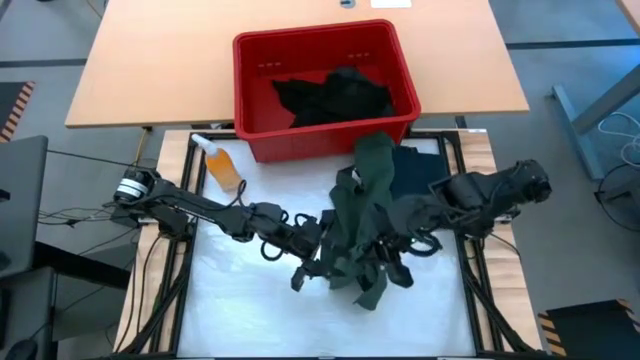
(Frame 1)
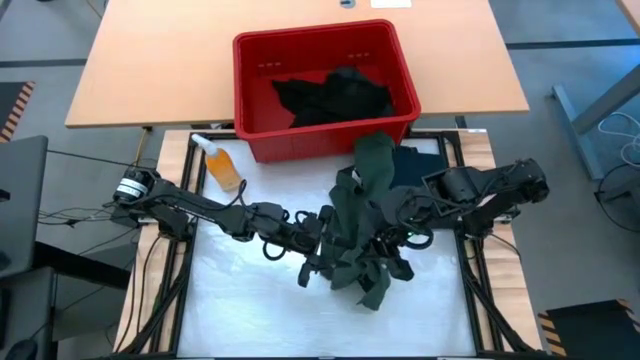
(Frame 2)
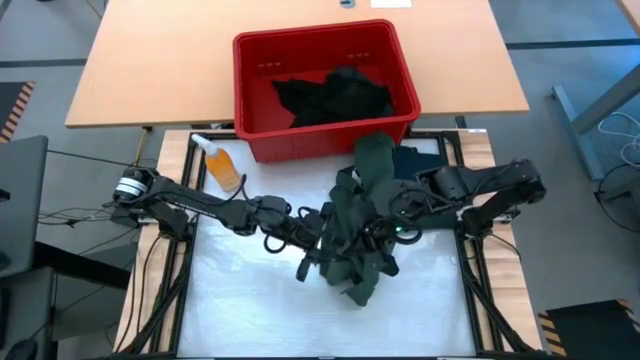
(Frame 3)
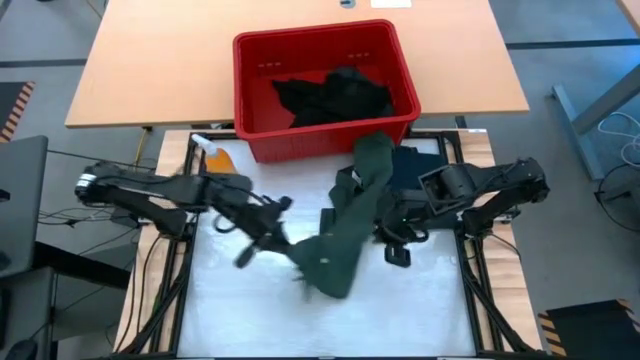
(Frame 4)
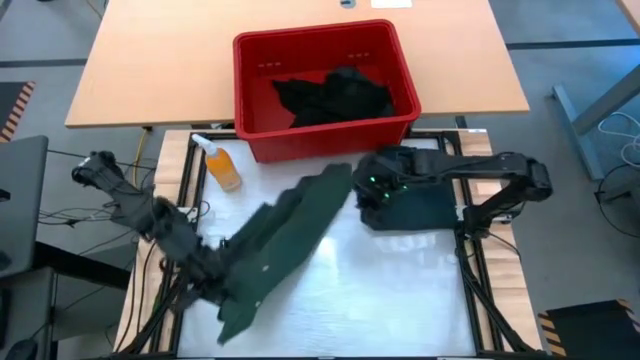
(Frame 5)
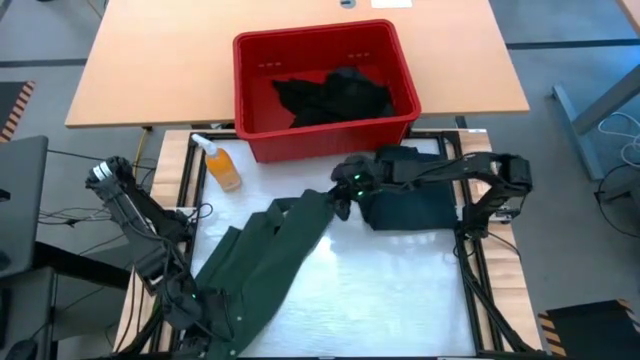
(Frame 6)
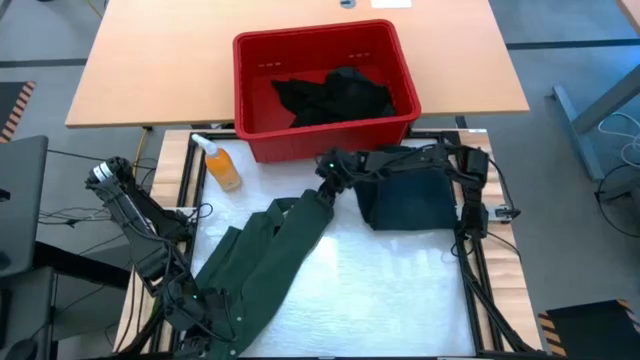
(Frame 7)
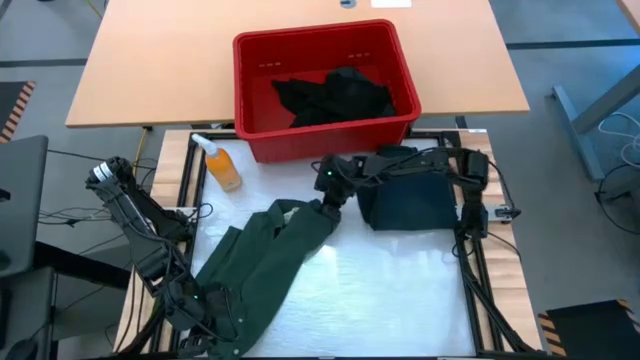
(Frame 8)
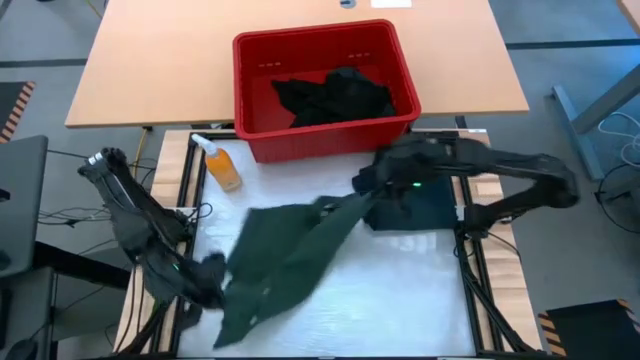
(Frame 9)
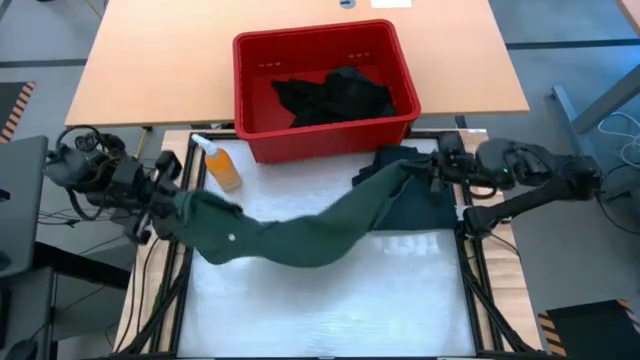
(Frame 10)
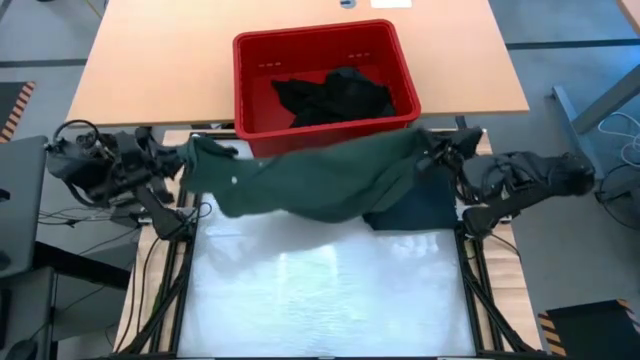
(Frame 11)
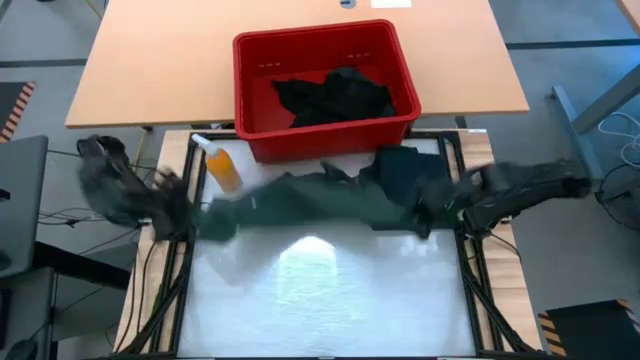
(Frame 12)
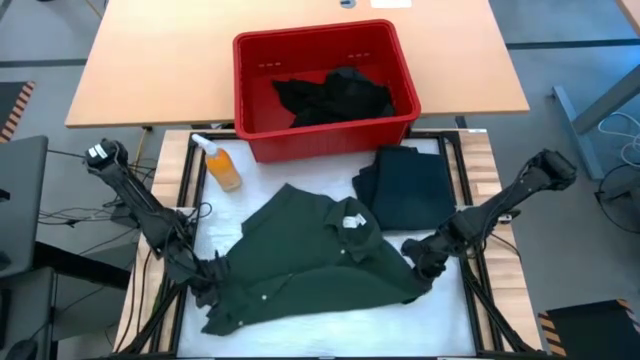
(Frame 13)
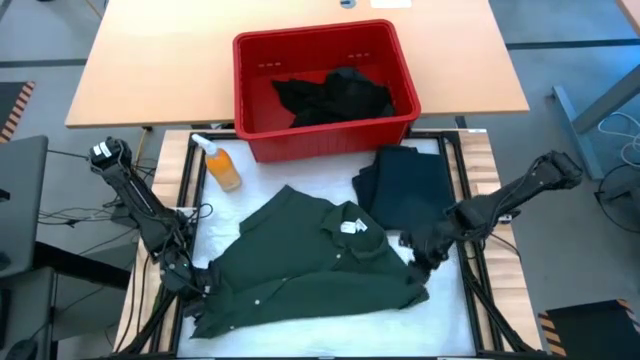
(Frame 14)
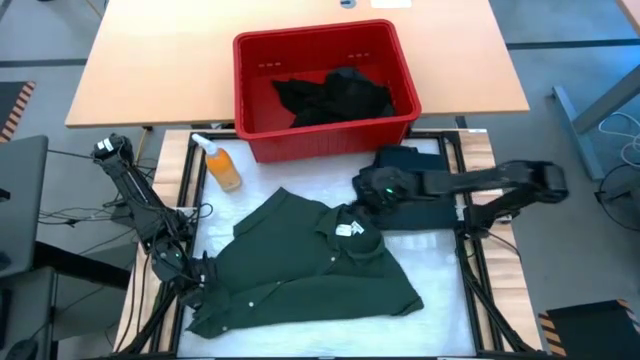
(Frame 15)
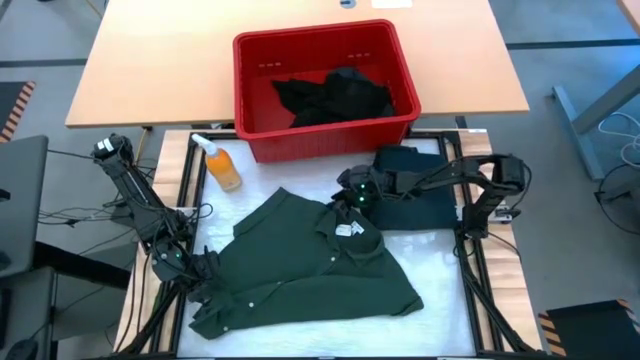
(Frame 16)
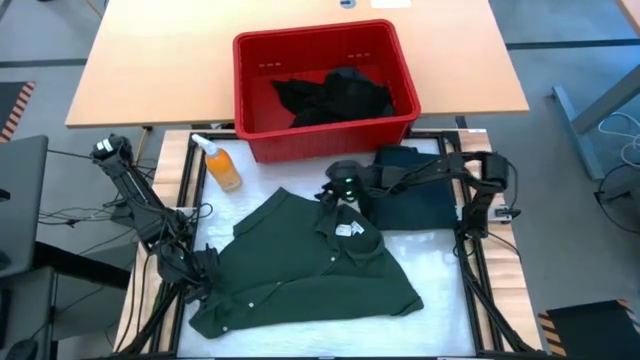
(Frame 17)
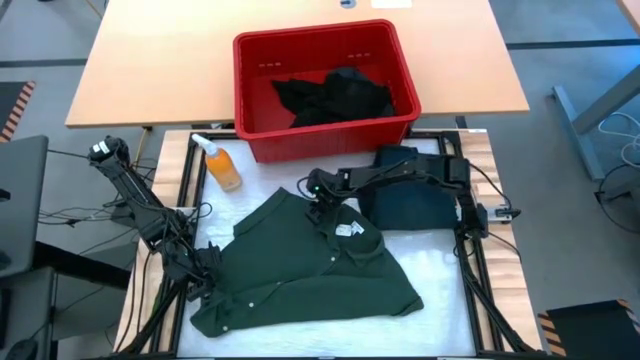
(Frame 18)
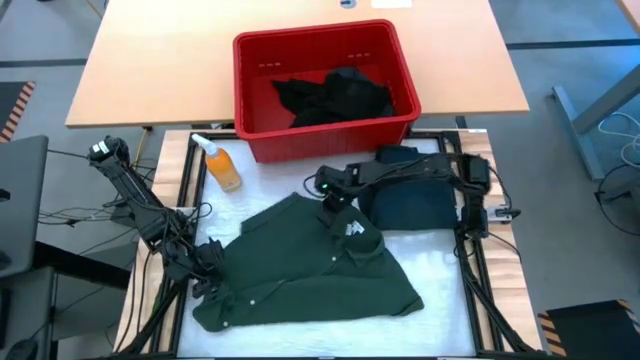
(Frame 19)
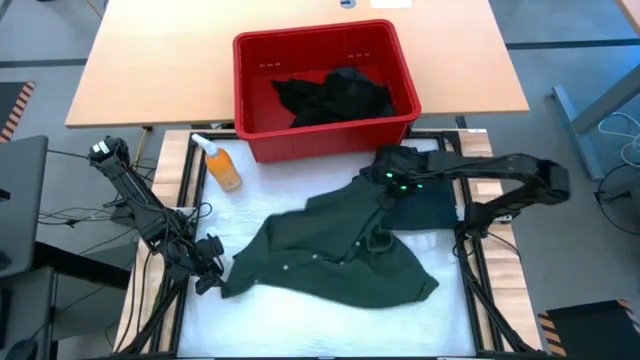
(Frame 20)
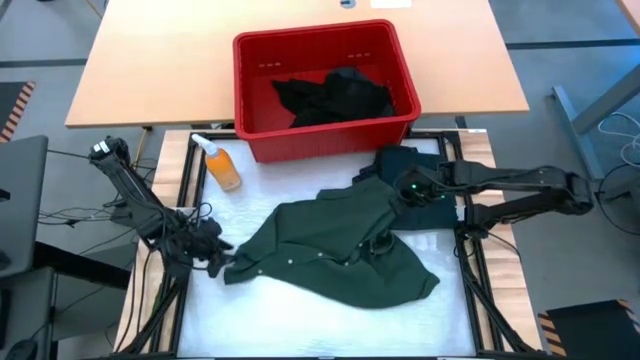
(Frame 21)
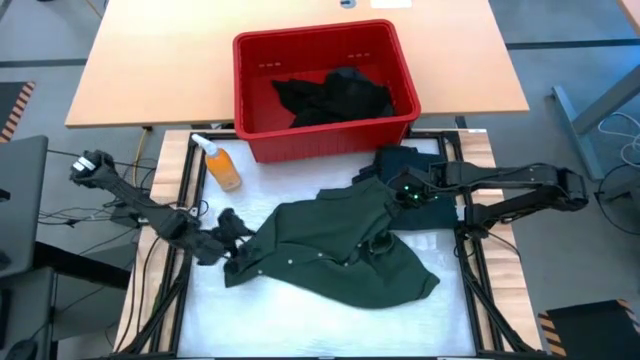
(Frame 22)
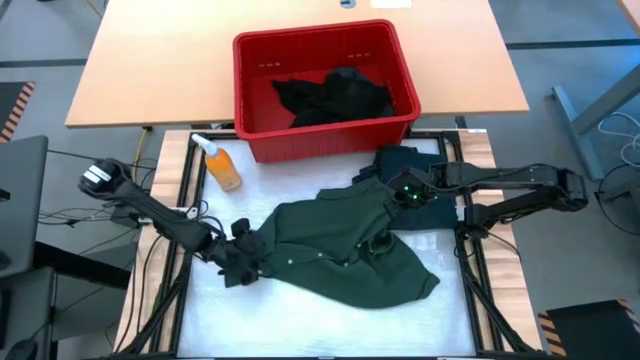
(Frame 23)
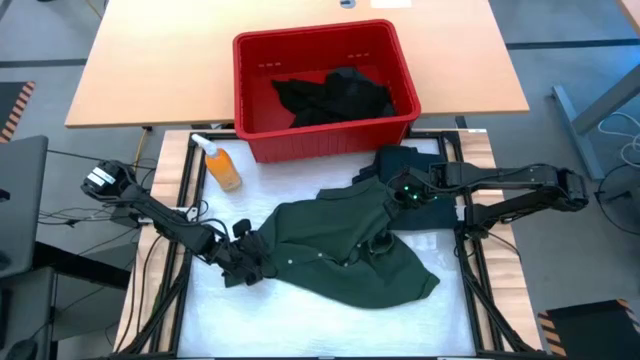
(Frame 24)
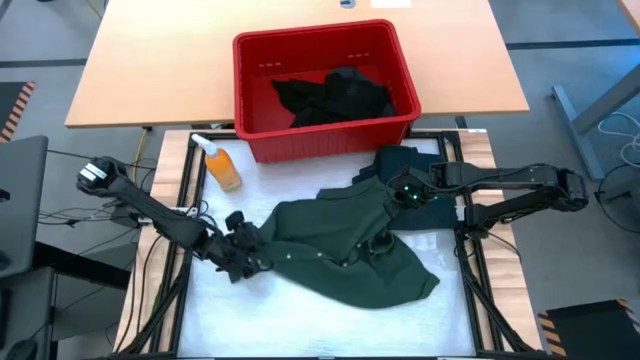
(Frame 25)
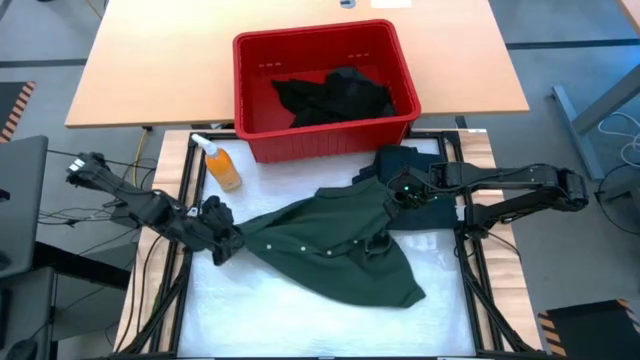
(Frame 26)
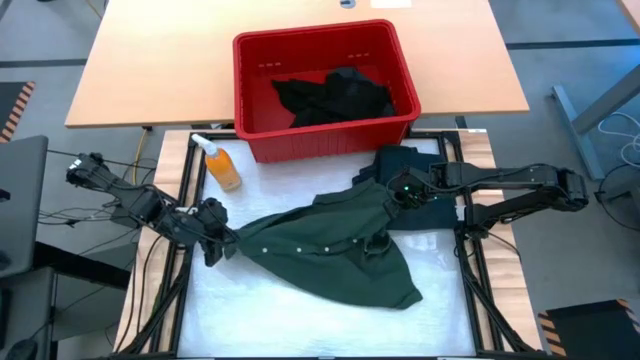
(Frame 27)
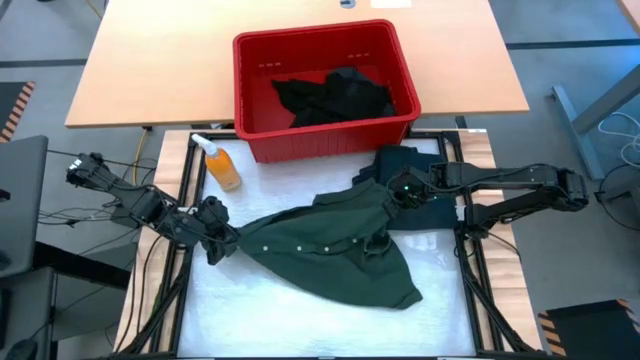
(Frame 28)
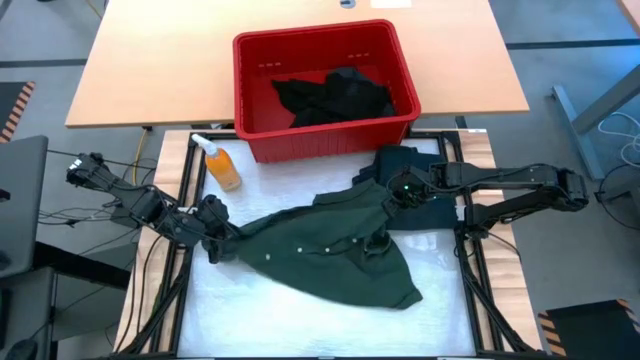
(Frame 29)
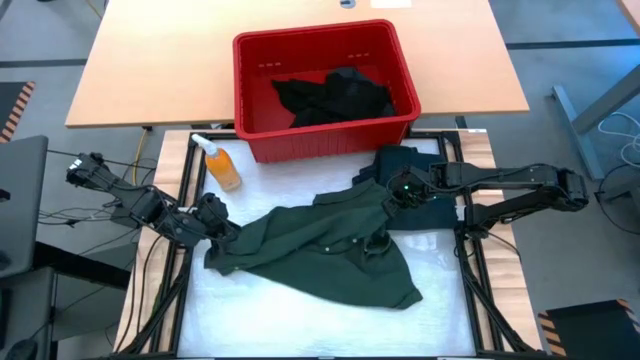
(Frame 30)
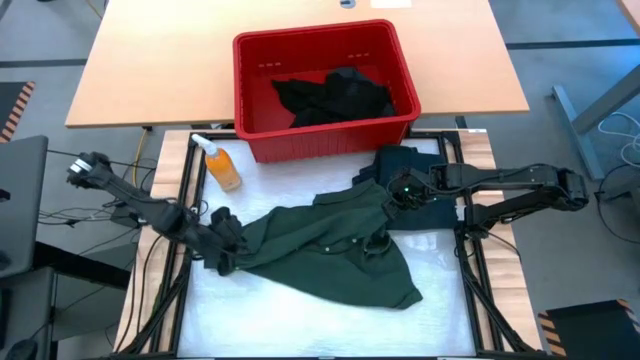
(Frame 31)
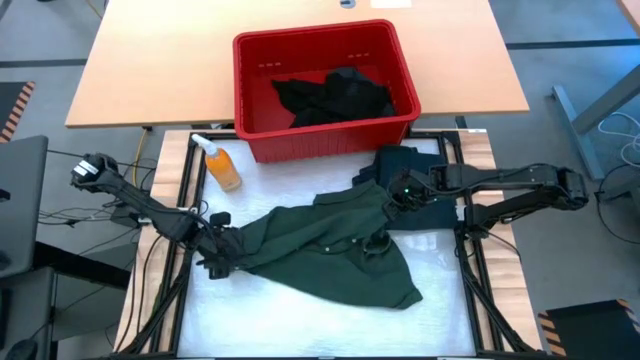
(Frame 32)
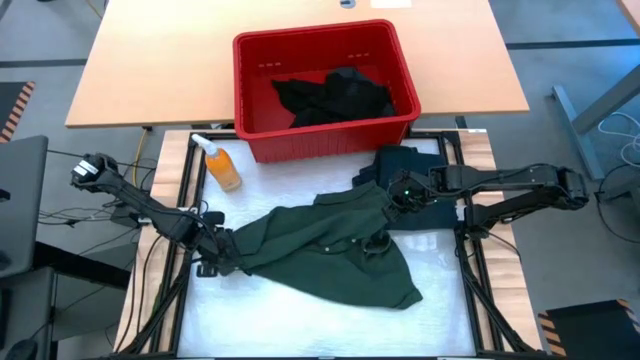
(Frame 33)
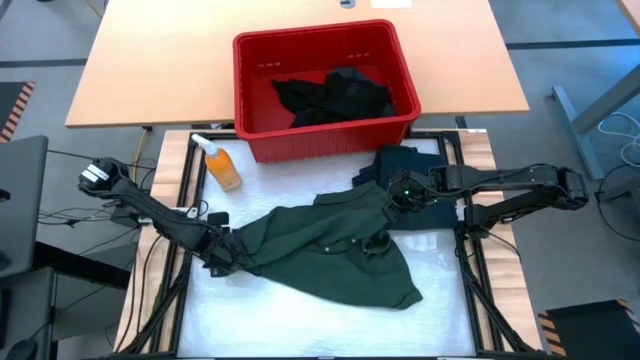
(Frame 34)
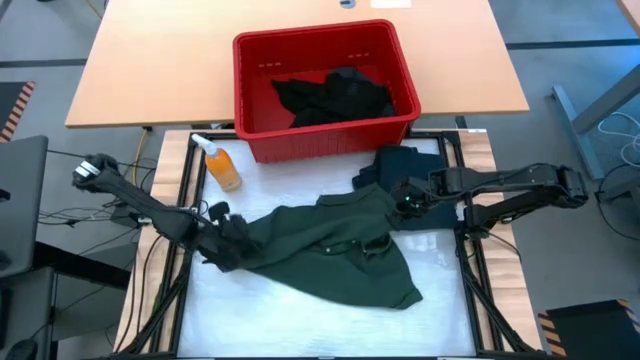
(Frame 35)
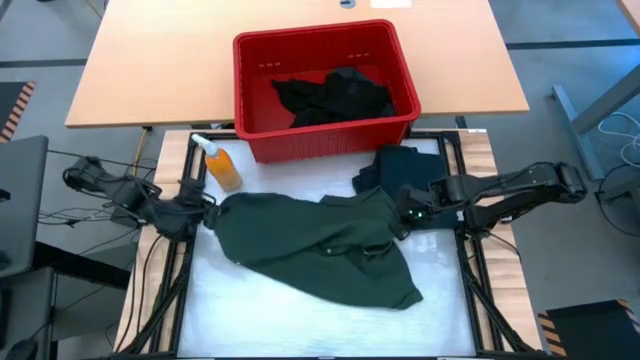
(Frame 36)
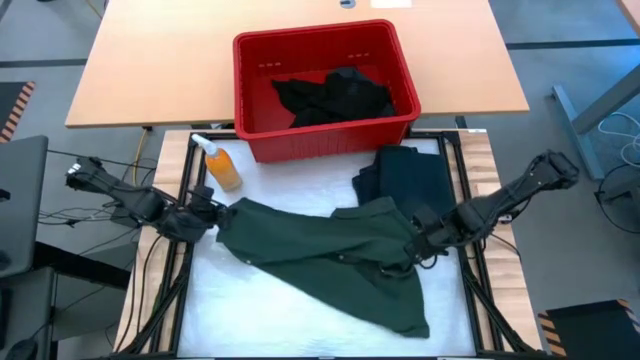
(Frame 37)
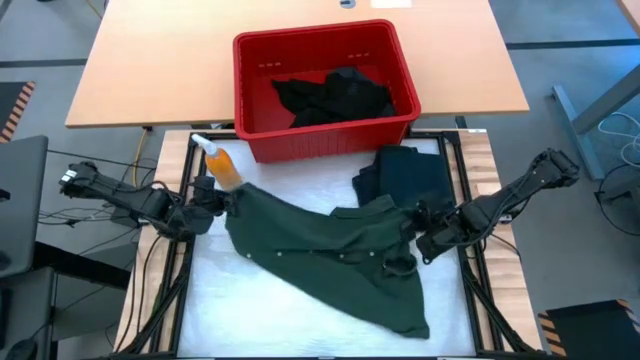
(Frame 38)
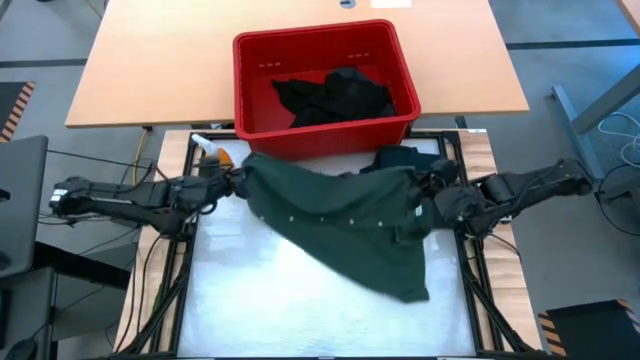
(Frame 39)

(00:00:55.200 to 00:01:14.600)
Task: Fold laundry
Fold the green polo shirt
